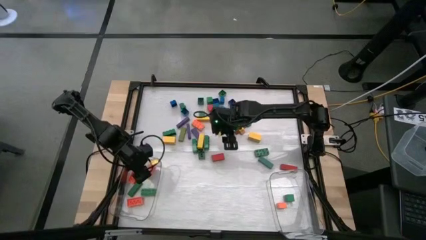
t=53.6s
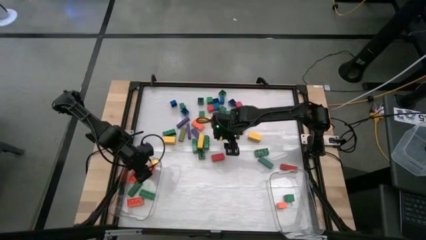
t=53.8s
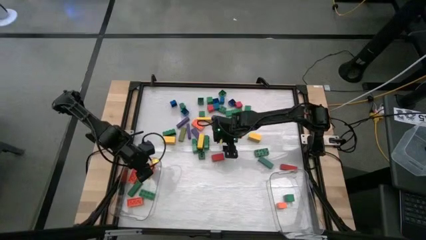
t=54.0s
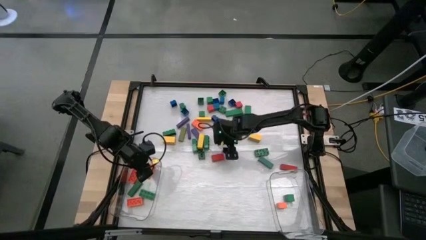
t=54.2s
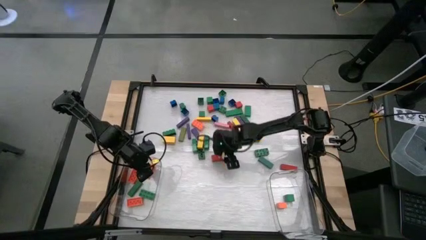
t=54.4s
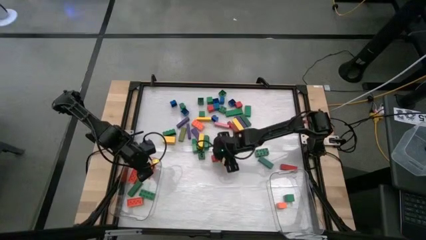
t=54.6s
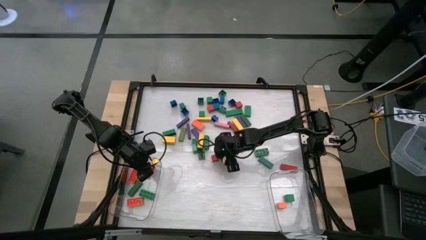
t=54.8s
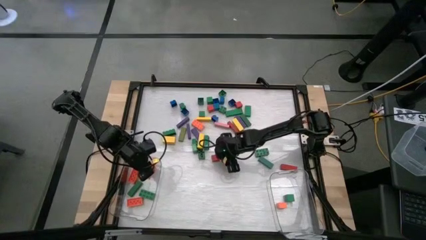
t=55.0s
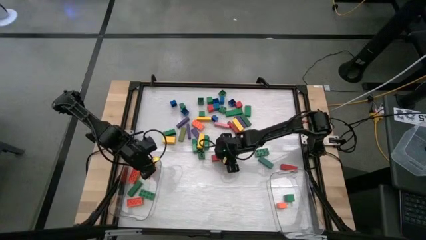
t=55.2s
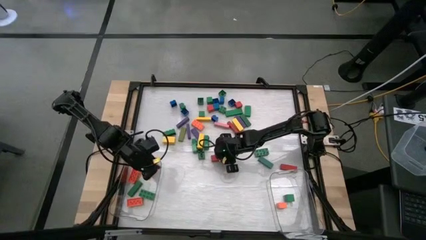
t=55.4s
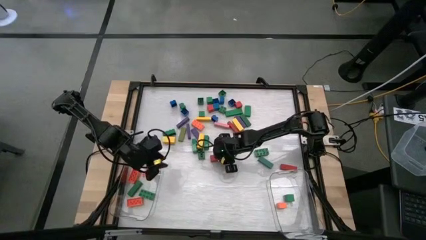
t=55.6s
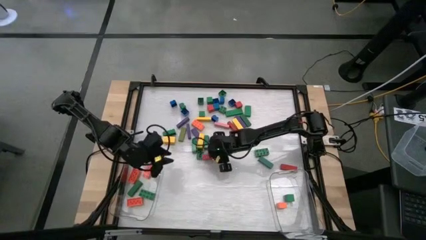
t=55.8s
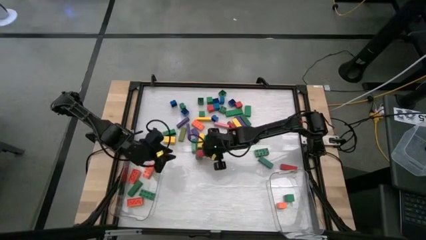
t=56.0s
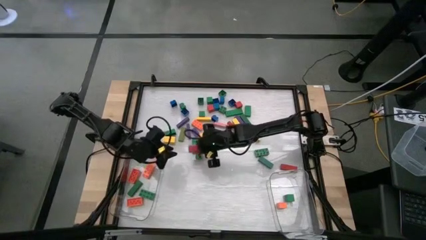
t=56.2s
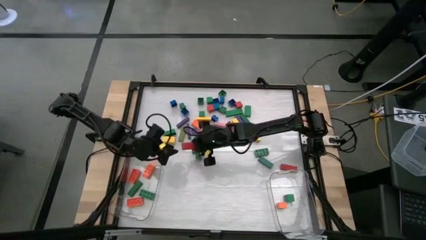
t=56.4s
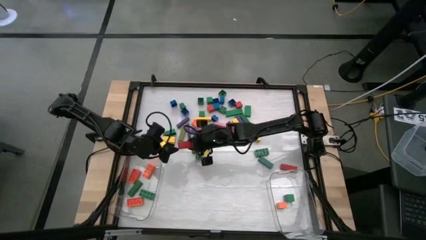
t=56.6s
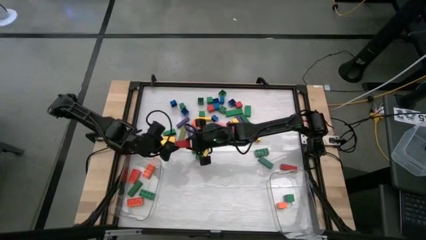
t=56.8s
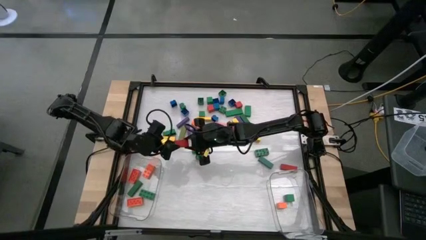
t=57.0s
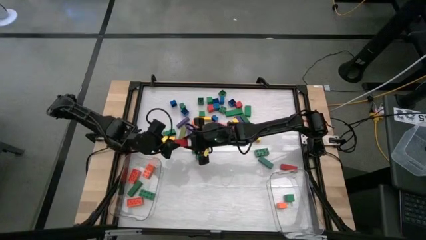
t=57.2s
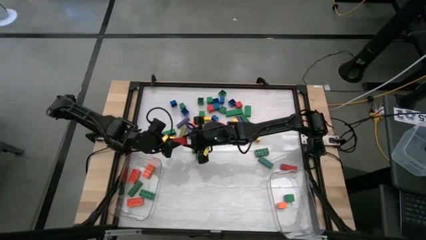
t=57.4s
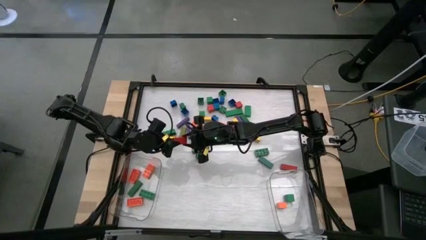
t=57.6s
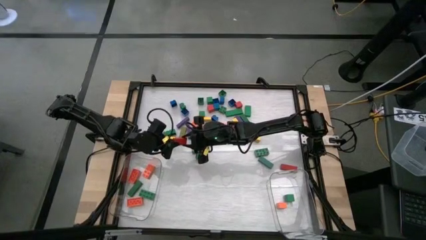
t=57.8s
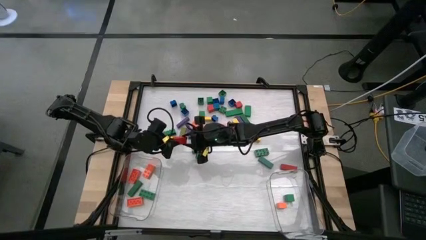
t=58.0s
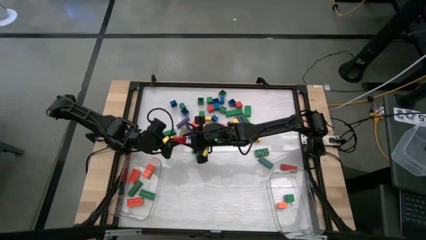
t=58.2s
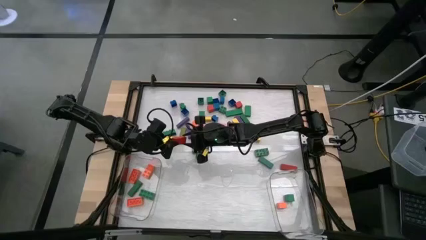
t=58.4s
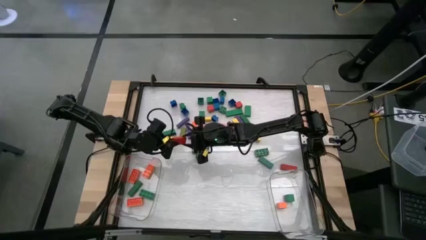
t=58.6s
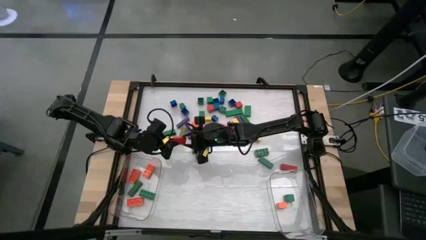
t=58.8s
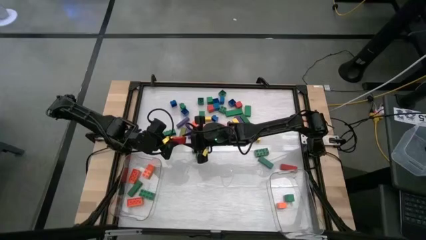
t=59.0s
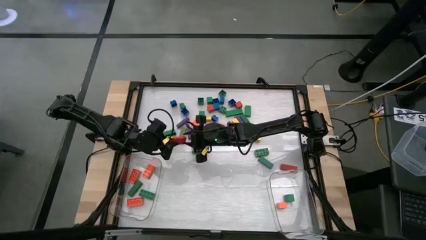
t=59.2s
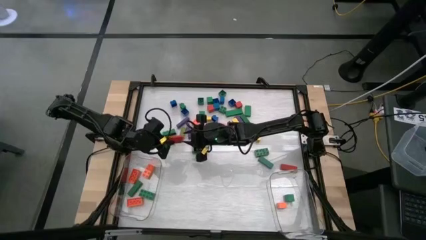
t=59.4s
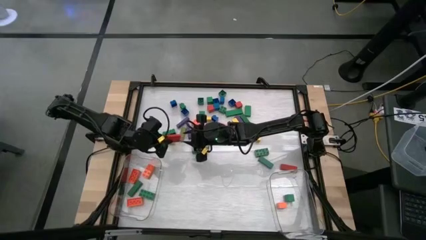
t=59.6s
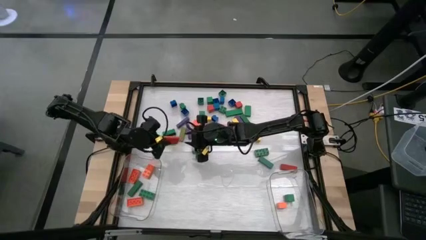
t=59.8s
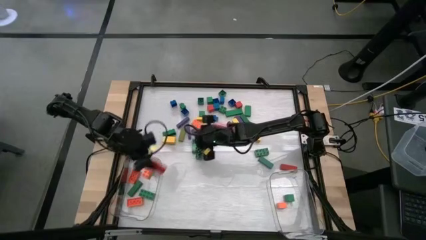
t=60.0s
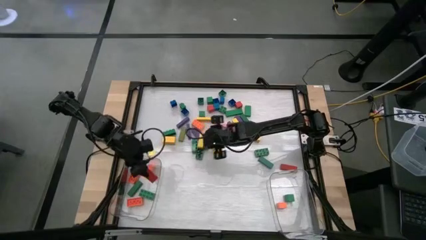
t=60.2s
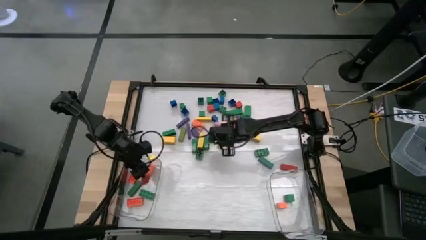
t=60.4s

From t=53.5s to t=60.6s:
Task: Sort blocks by size
Put the large red wooden block into the left transparent bin

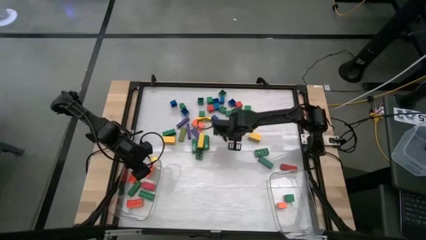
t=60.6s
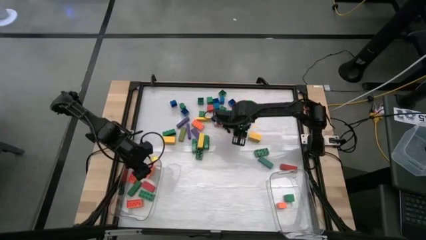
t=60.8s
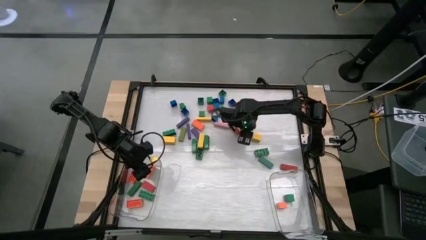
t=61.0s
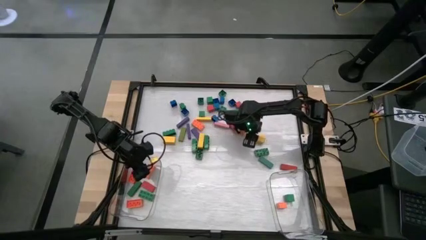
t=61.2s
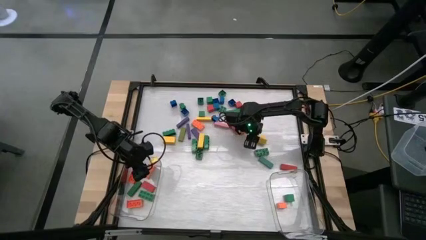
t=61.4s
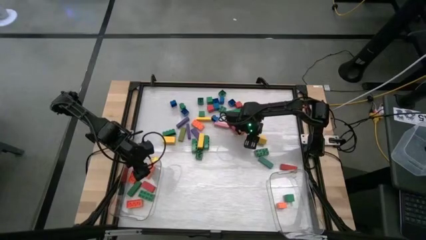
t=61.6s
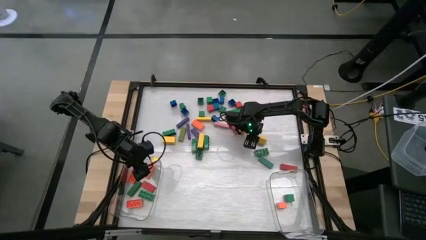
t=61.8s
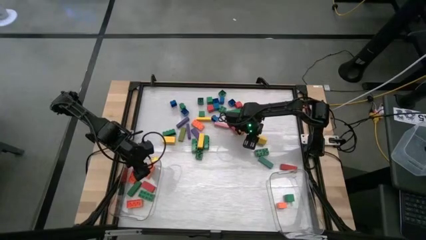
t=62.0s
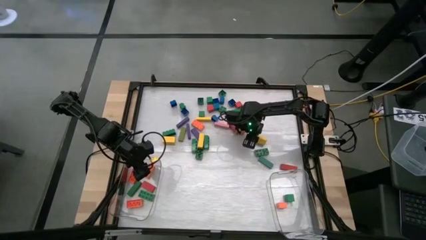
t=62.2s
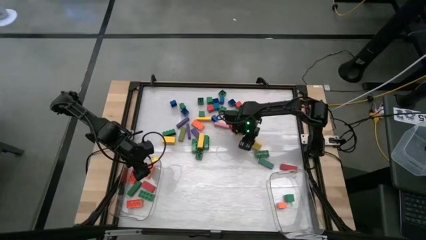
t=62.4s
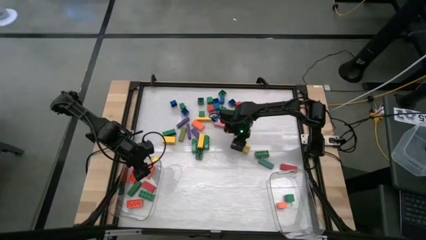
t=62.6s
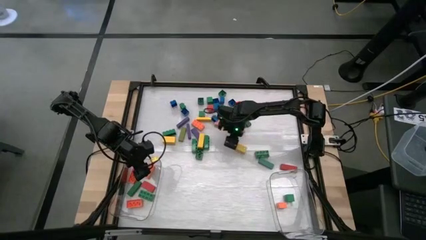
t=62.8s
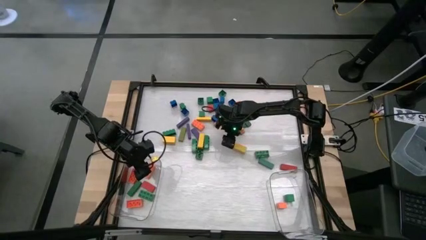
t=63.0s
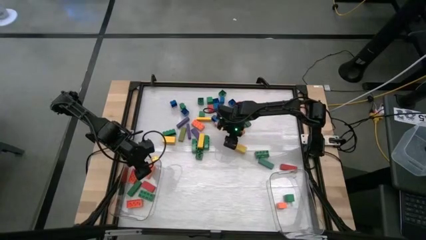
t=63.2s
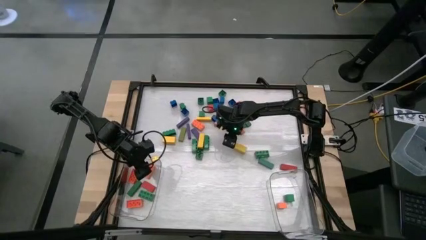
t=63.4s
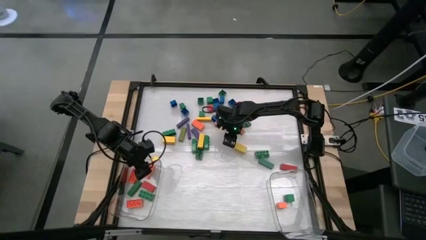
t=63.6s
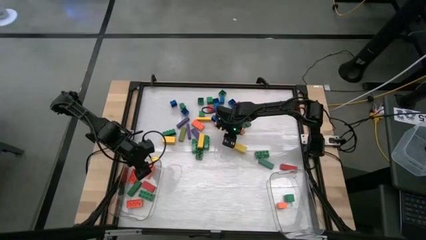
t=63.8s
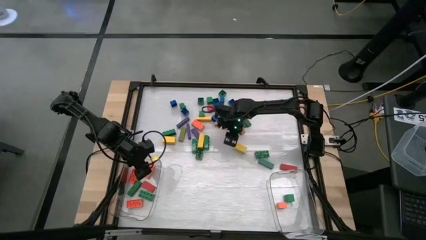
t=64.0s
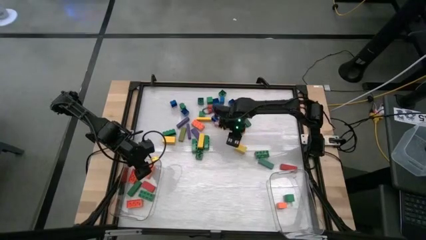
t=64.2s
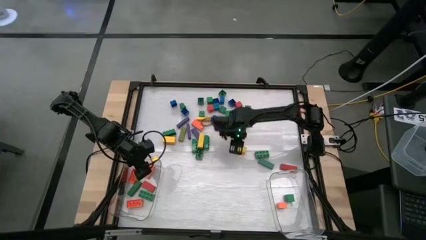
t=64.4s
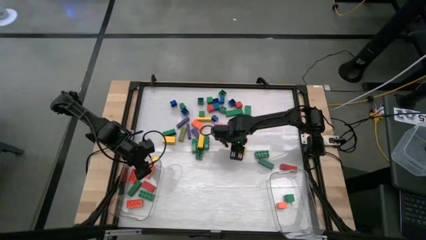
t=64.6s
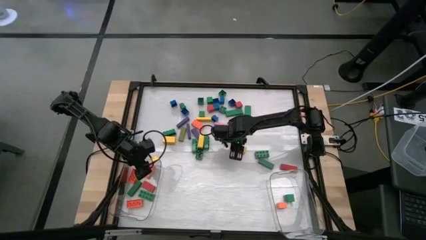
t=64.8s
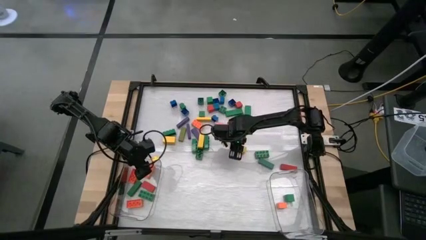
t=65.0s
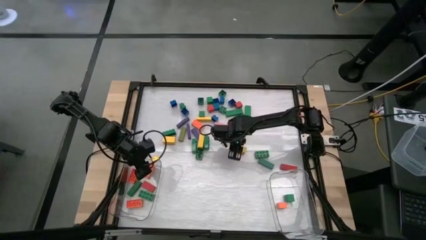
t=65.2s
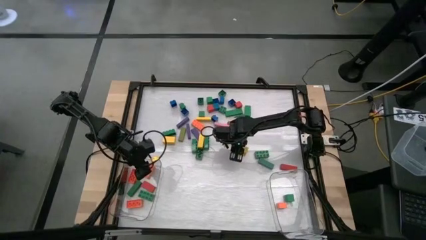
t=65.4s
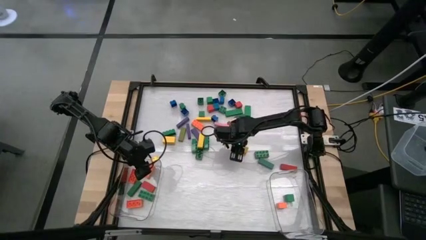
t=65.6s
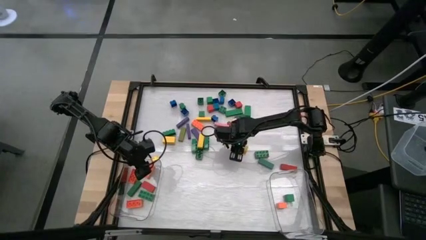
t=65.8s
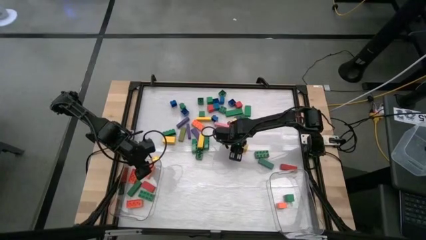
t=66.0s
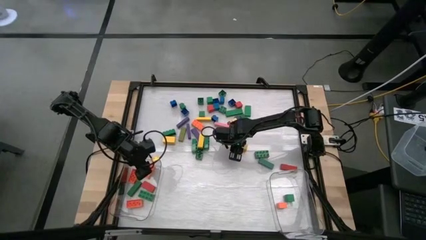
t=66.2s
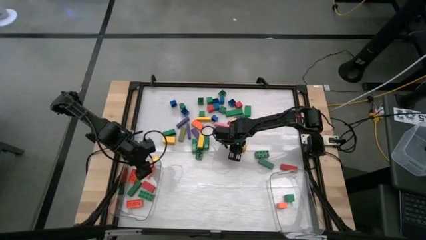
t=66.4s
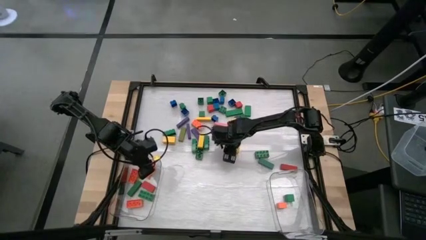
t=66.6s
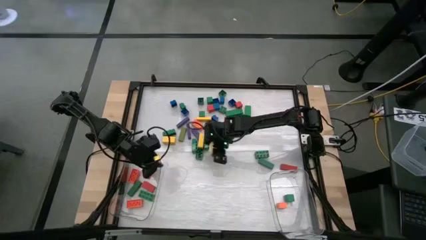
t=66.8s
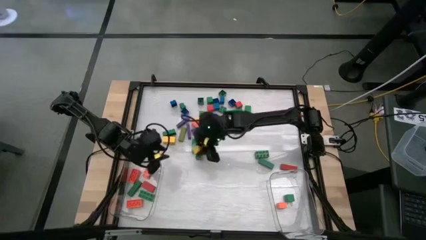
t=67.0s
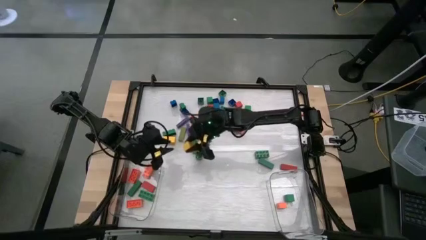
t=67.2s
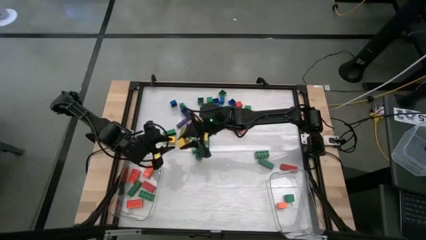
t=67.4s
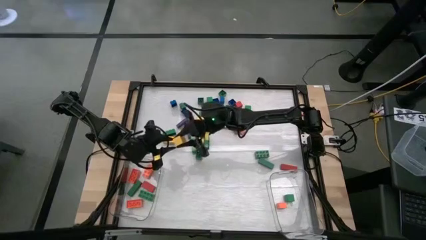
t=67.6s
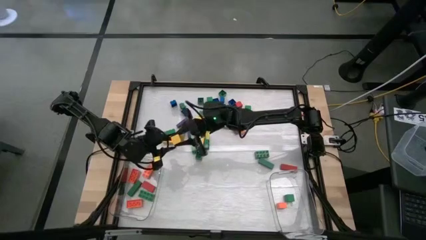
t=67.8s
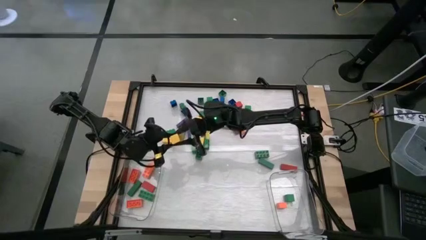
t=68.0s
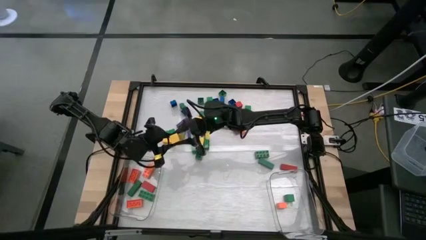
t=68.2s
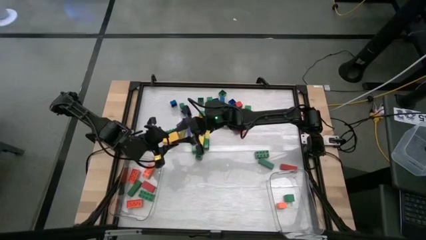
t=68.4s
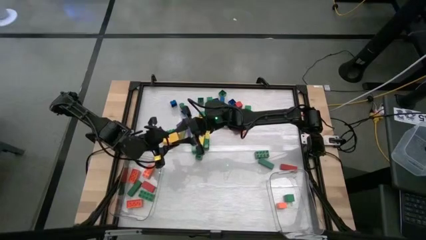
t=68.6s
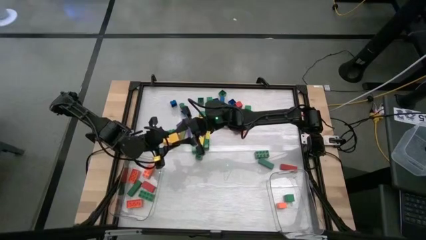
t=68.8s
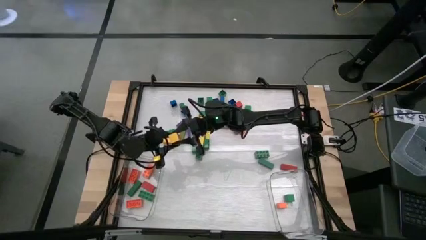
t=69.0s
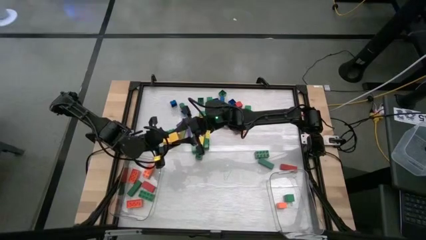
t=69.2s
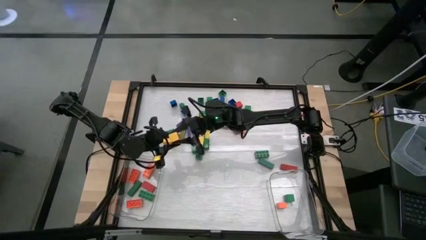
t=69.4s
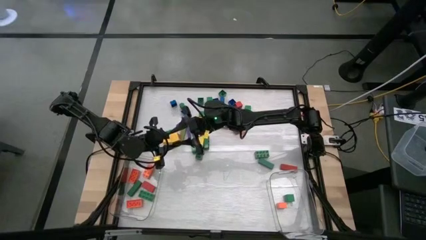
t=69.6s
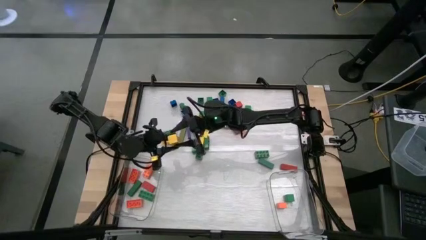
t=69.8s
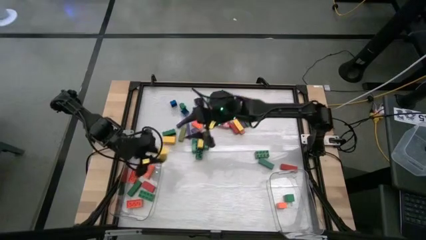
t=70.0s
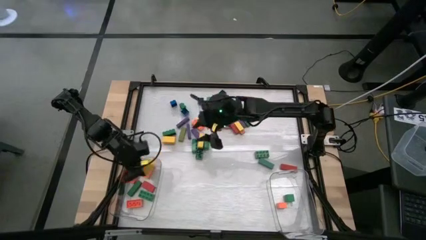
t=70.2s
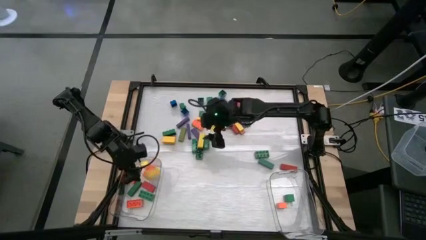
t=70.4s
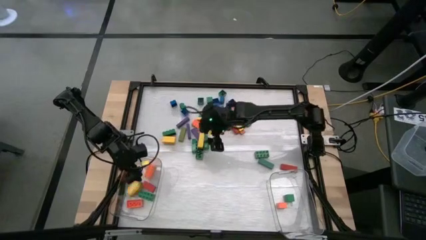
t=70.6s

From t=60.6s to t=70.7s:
Put the large yellow wooden block into the left transparent bin
